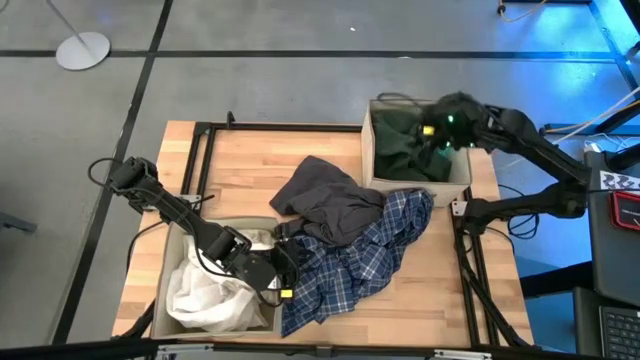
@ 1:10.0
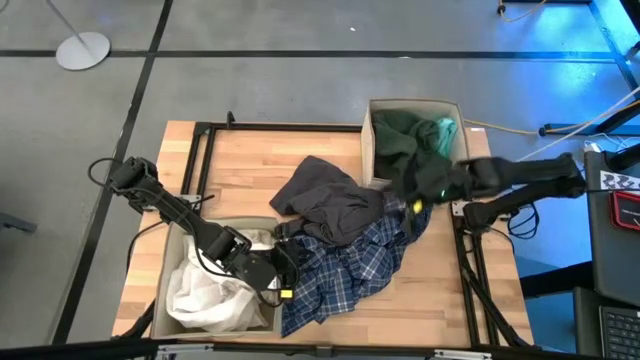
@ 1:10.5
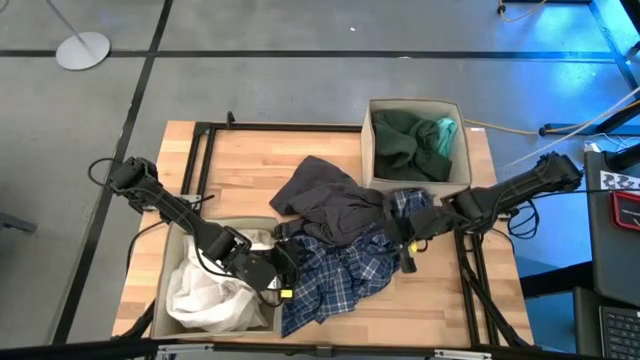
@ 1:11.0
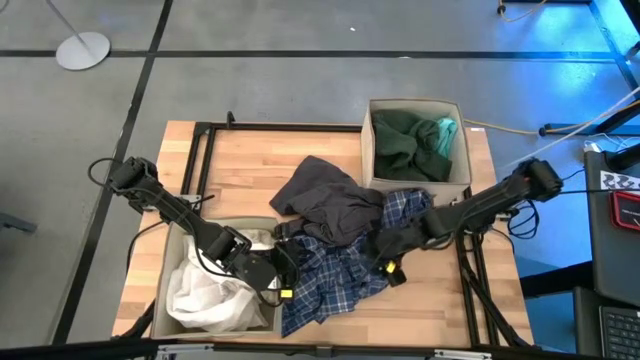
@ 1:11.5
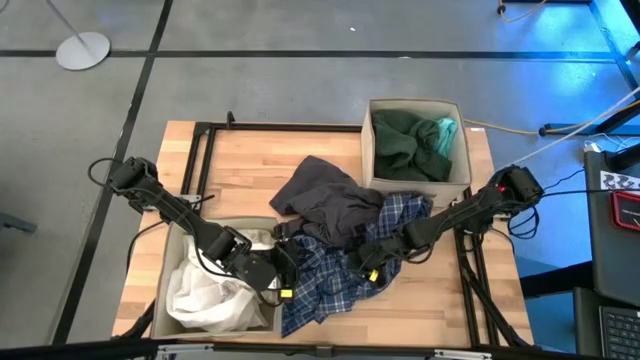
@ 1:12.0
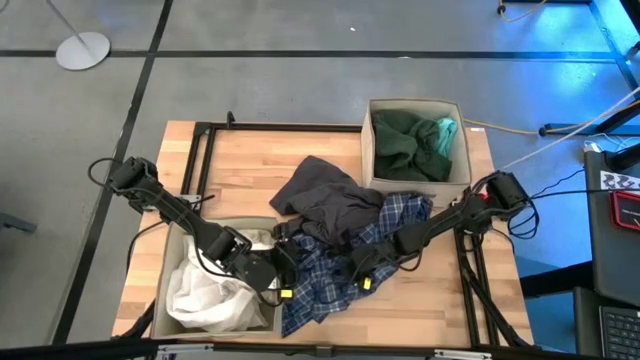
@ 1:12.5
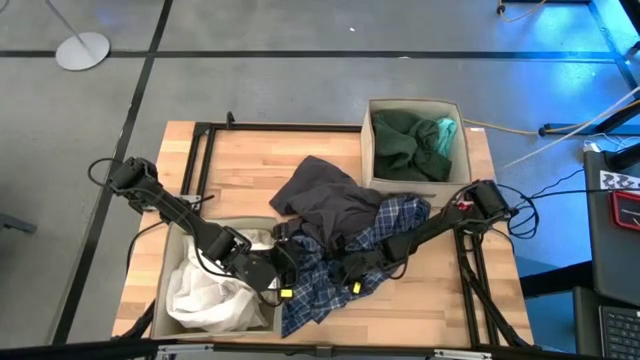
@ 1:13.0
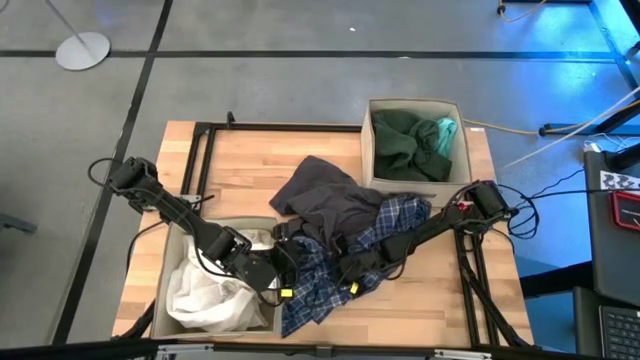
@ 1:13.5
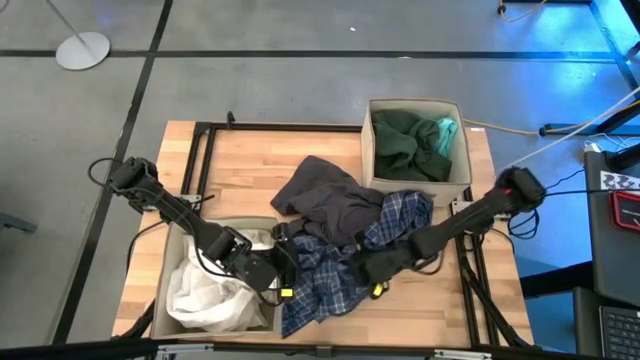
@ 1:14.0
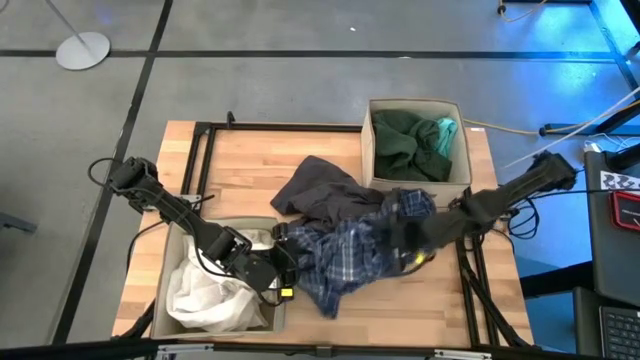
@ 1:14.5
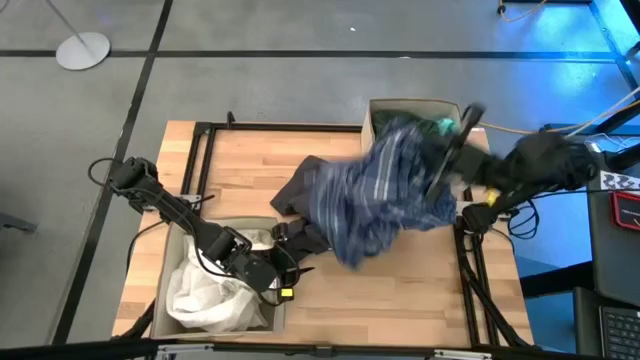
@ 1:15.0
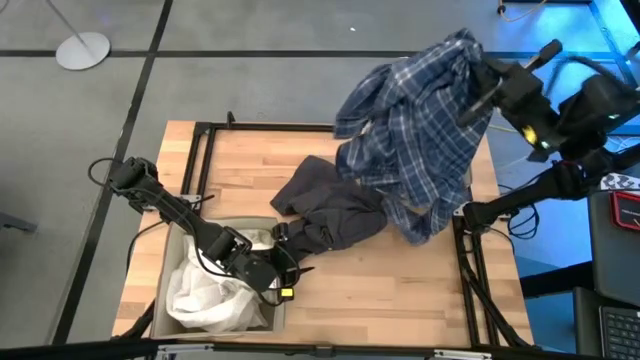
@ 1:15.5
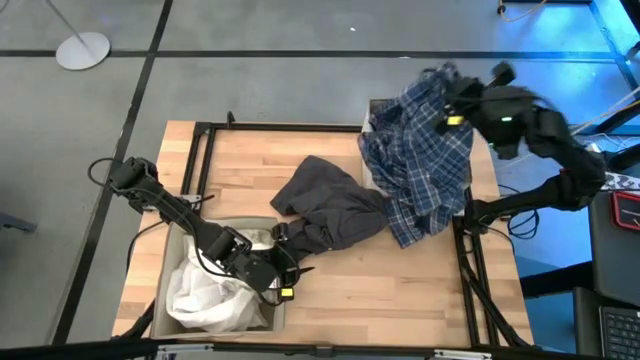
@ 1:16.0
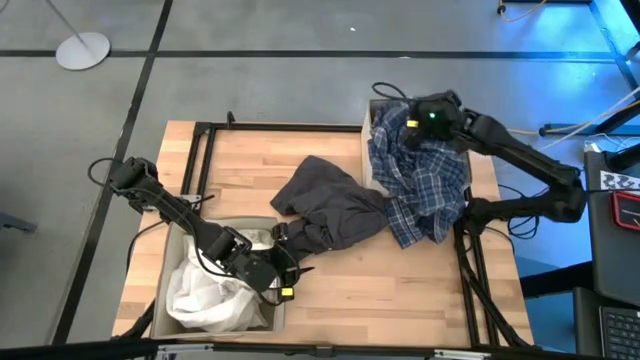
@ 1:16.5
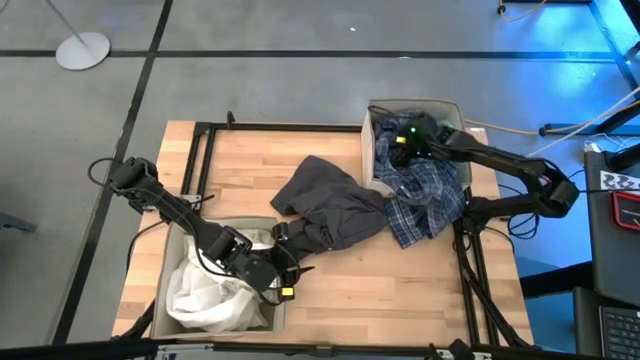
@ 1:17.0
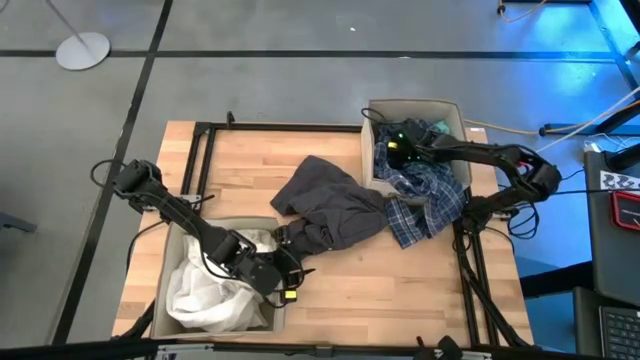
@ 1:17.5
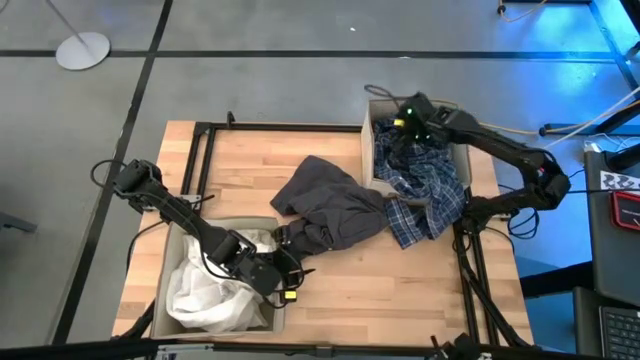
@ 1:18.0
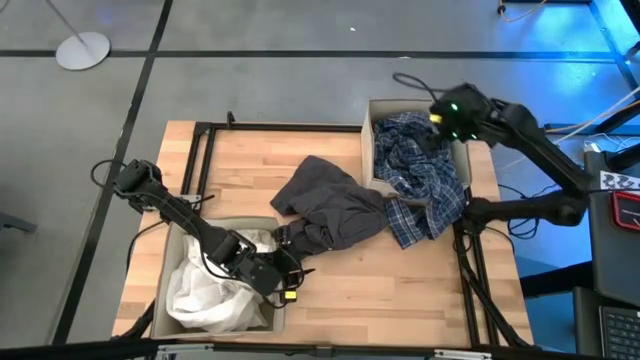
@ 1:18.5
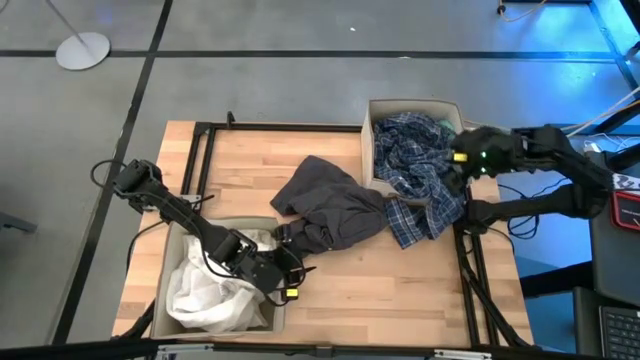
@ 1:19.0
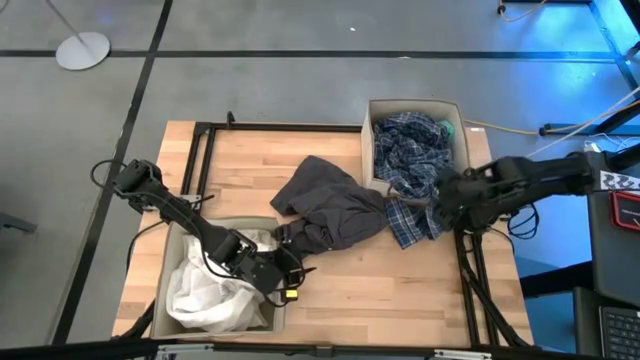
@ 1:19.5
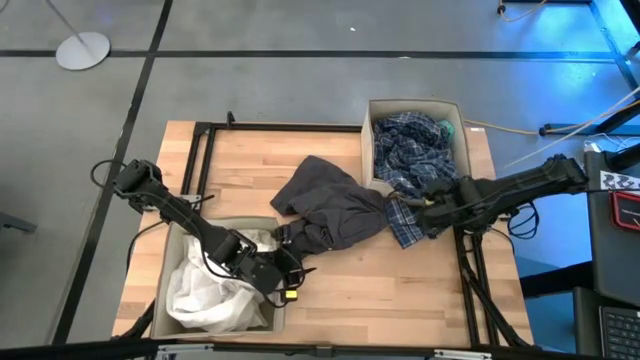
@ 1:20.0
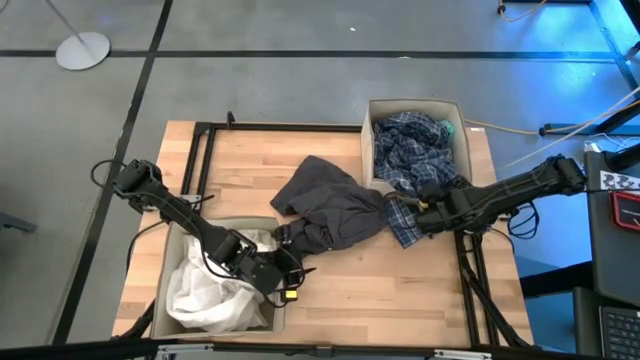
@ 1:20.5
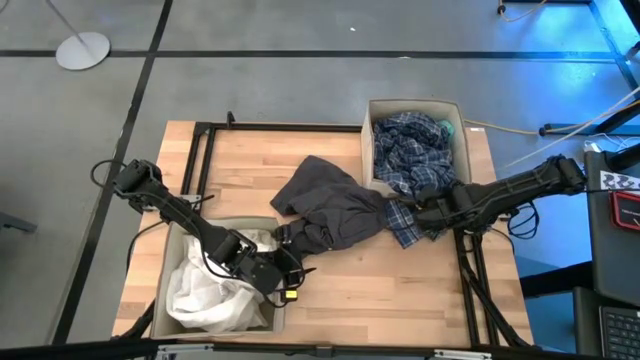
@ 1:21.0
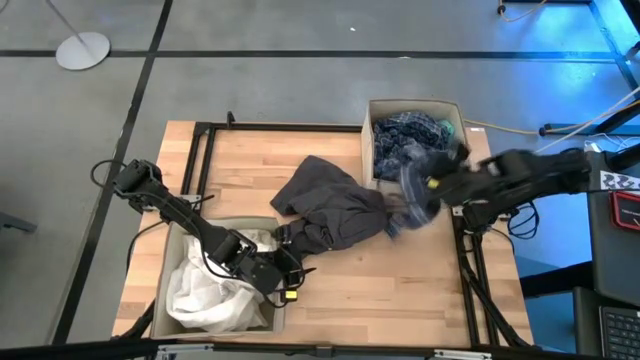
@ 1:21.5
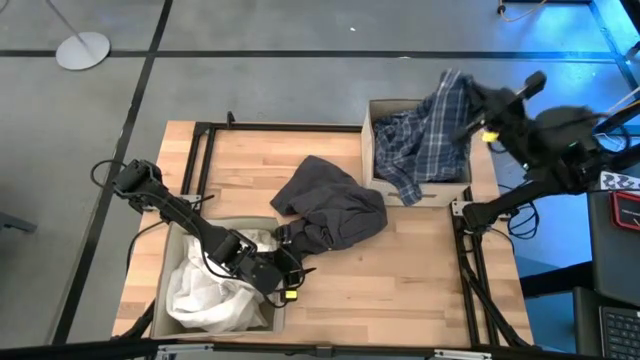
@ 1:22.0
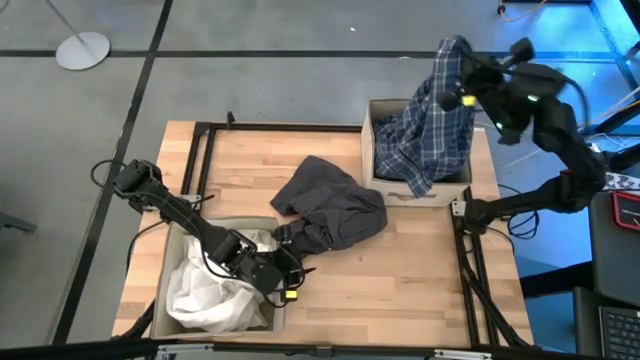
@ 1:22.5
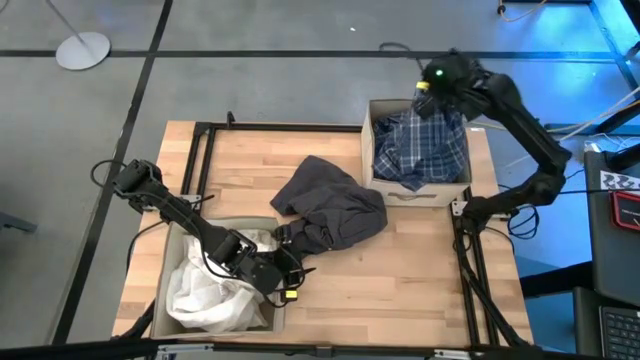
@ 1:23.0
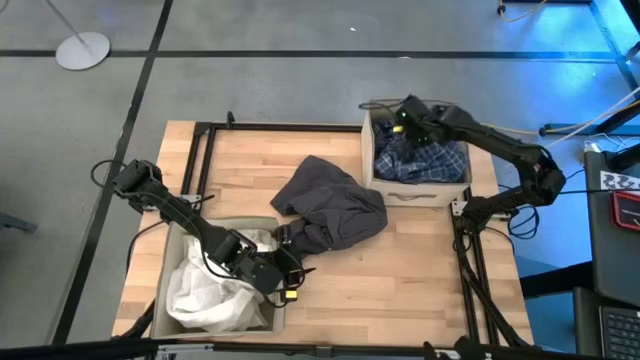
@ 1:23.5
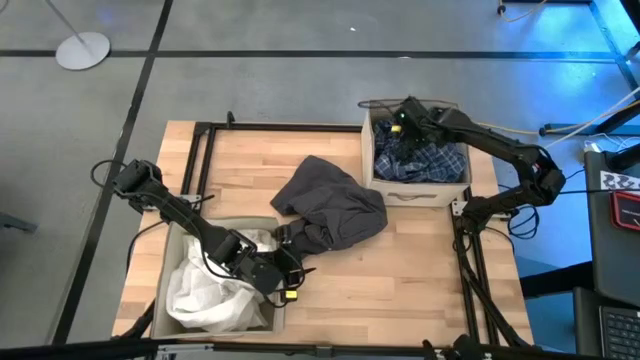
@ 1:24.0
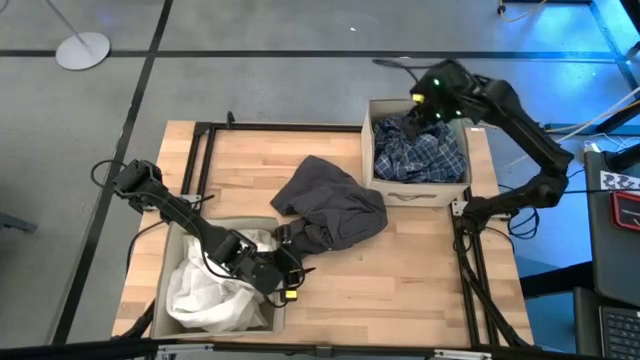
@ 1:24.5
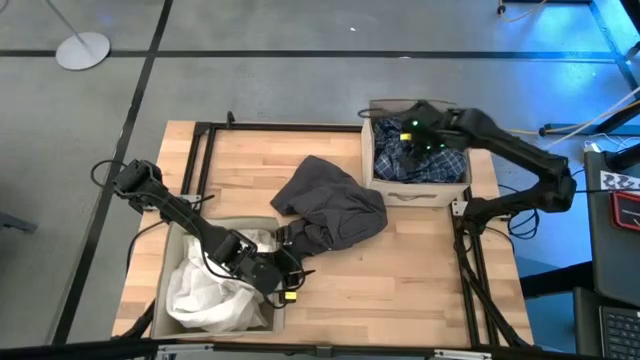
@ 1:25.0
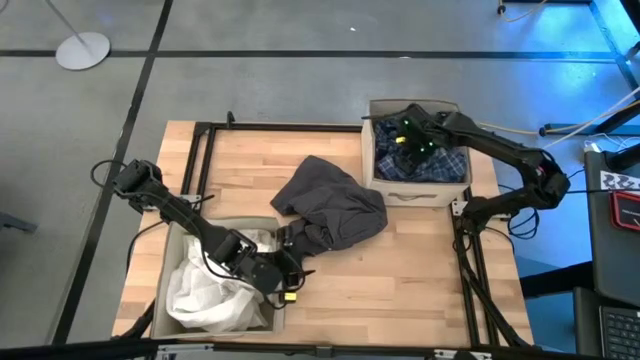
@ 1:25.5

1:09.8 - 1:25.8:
Task: Sort clothes
Put the blue shirt into the top brown laundry bin

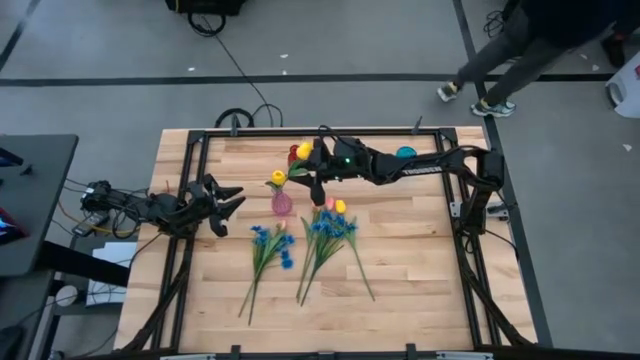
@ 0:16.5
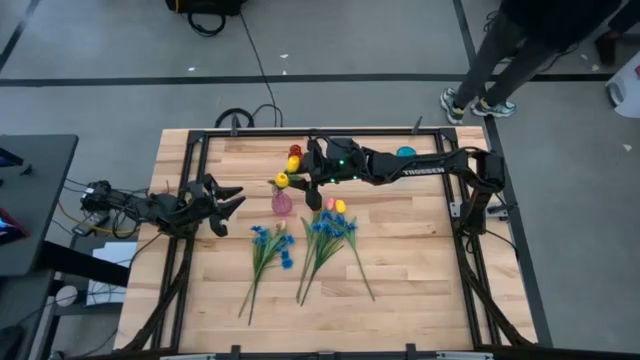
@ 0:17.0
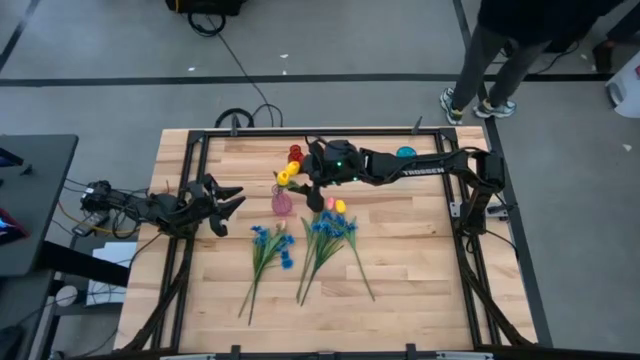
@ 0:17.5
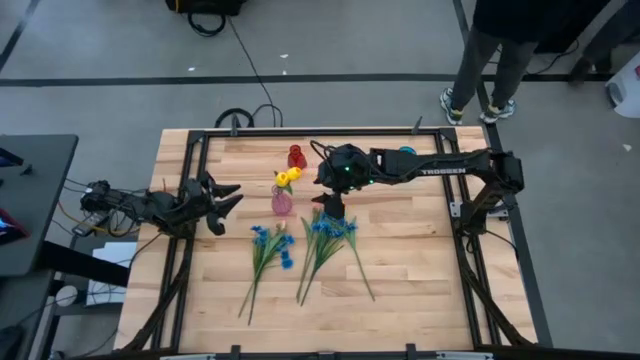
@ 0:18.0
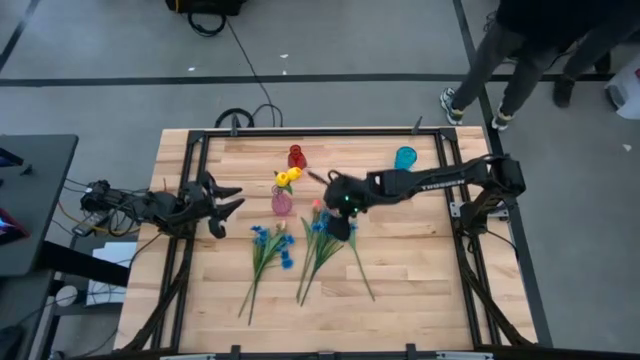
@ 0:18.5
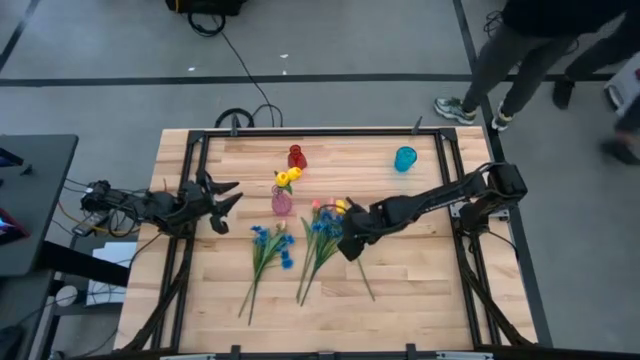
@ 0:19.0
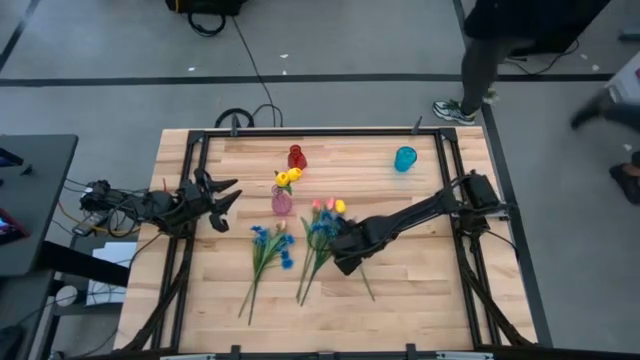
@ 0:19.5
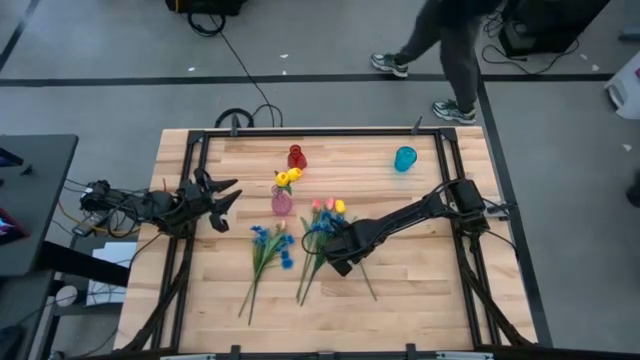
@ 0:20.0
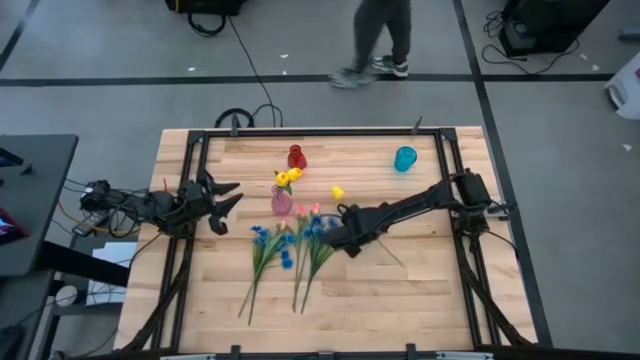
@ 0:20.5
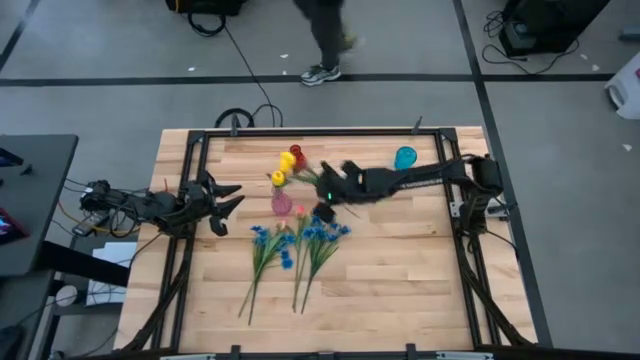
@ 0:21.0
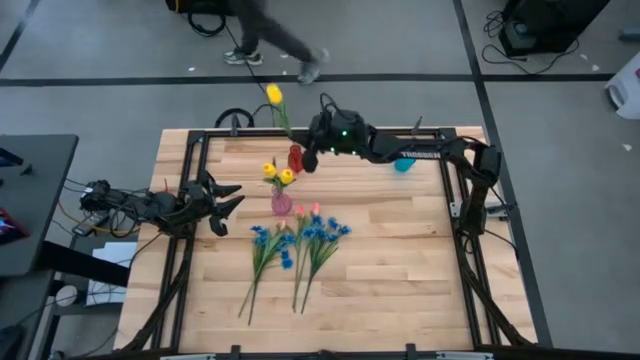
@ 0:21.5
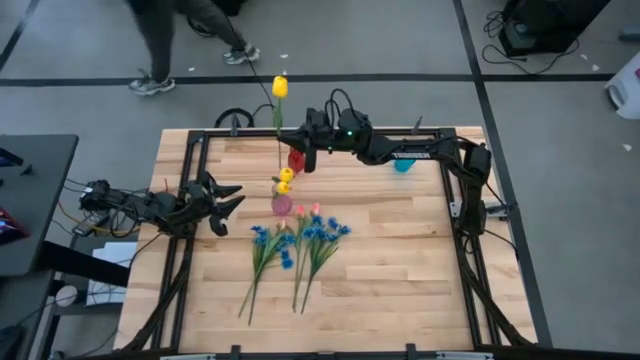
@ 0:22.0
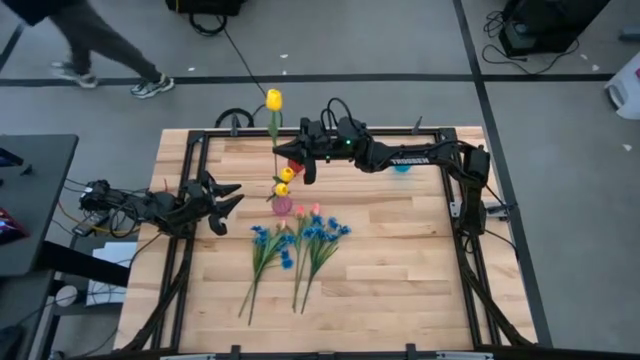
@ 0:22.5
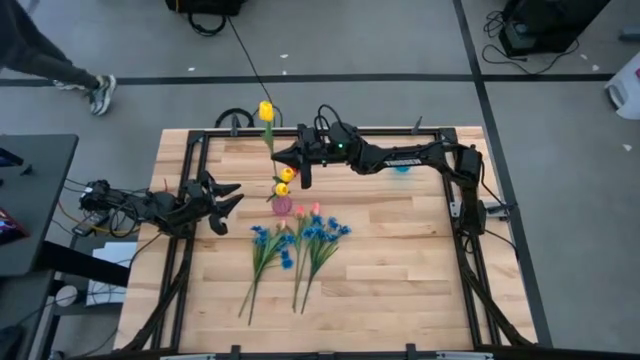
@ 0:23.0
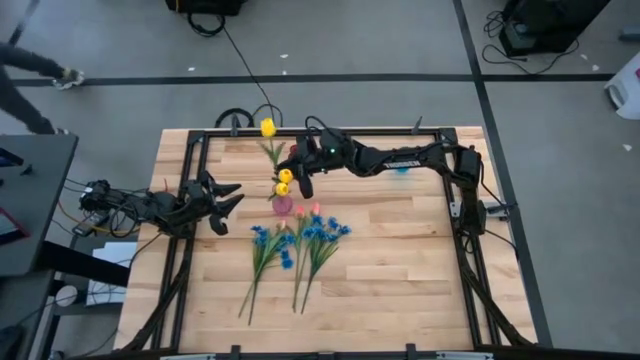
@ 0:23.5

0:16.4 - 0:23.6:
Task: Sort flowers into vase by color
Put the yellow tulip into the pink vase
